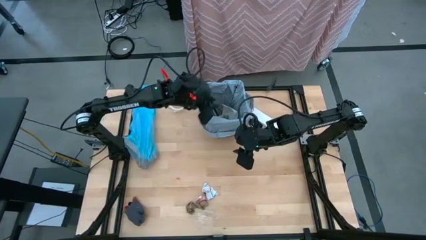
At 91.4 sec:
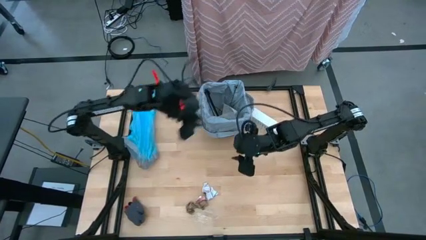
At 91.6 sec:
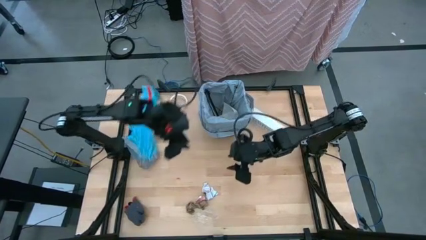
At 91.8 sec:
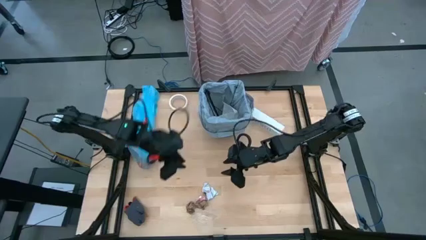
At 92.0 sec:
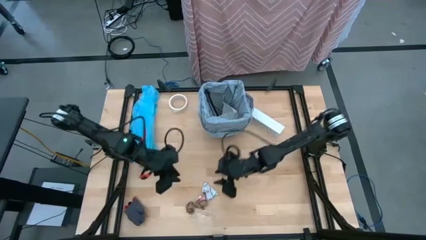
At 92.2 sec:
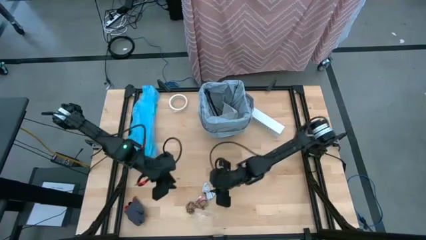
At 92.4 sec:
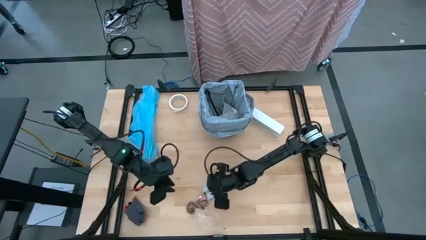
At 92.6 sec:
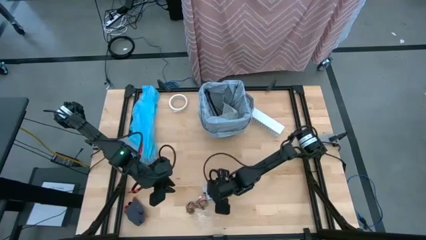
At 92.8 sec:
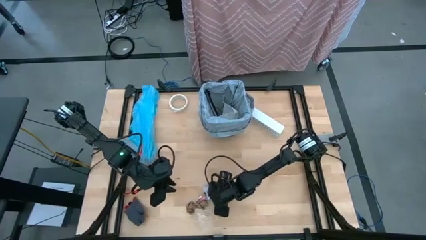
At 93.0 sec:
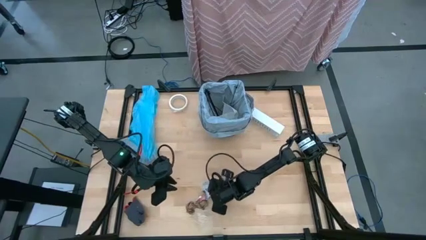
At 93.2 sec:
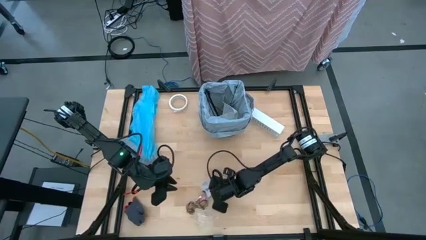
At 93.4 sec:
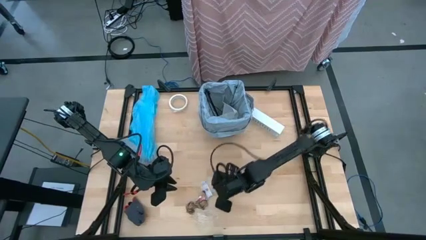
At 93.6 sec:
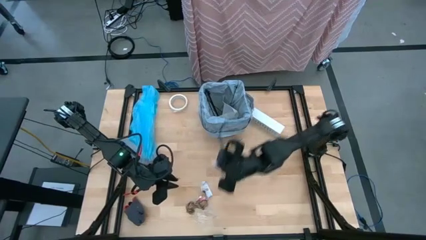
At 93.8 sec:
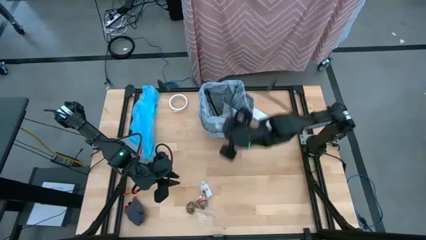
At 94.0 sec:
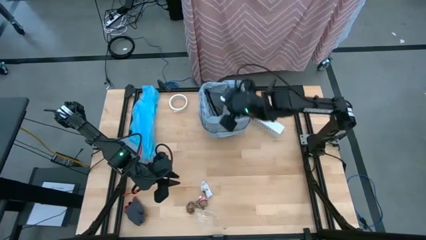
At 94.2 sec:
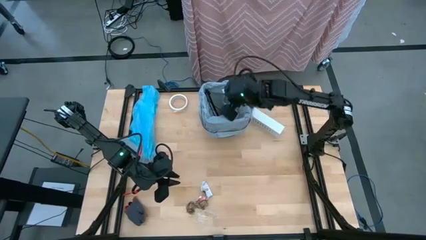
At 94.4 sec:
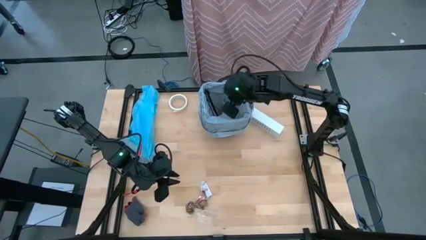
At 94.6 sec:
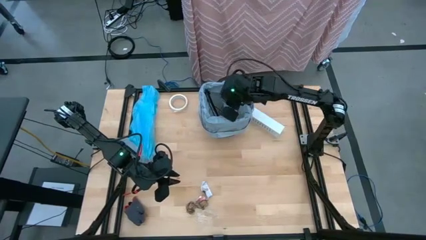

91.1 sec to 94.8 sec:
Task: place trash/remove bag and relplace
Put the white paper into the trash bin

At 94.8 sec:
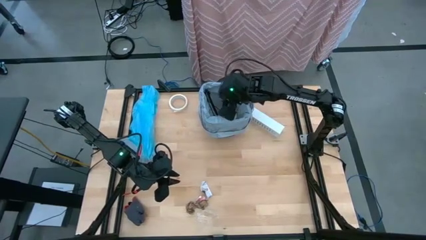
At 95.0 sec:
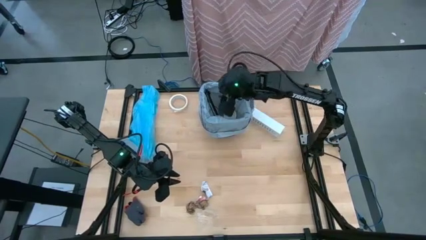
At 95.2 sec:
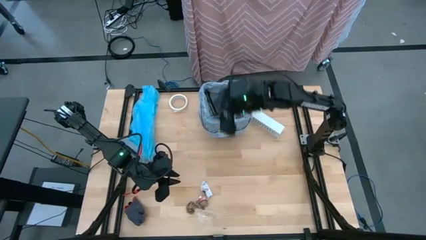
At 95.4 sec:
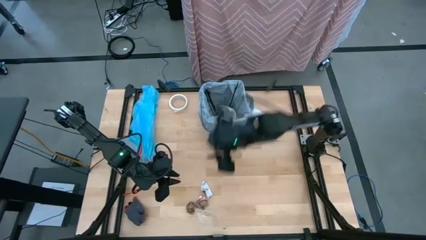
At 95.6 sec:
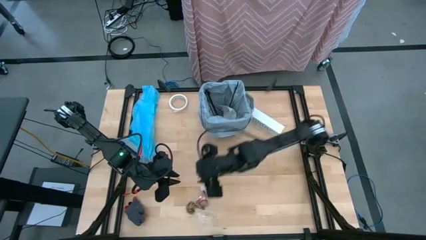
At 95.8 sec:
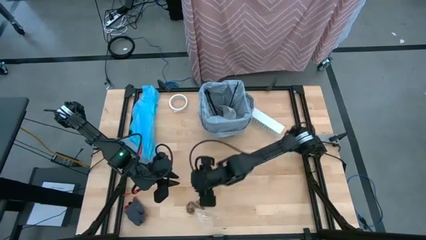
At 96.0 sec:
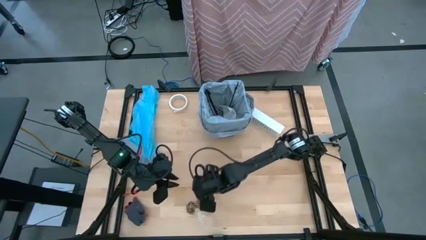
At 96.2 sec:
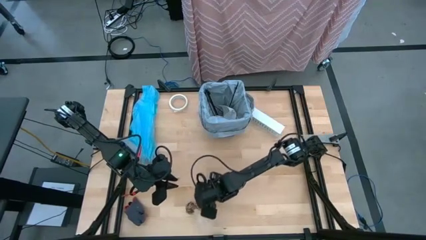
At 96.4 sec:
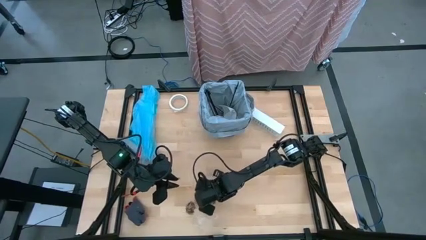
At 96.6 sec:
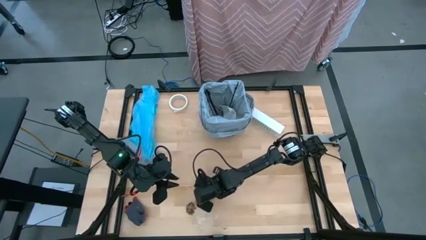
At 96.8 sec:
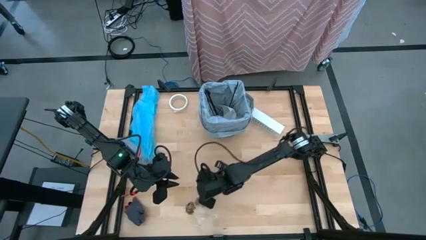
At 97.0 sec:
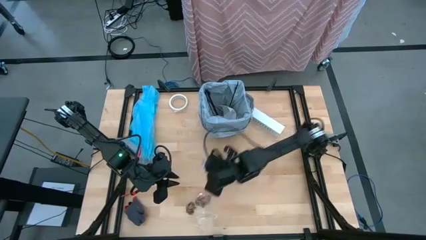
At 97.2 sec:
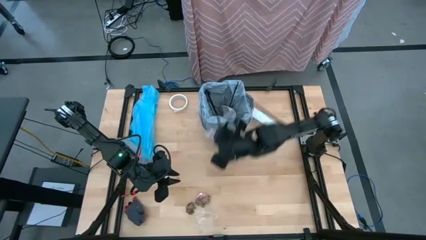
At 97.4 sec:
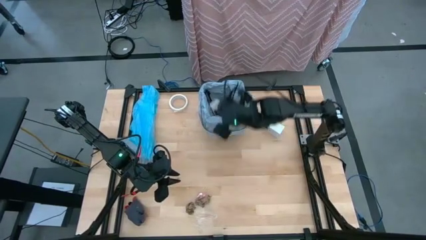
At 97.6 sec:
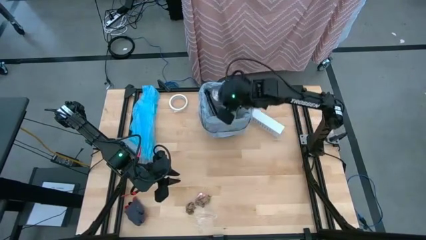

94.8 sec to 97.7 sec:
Put the sachet trash into the trash bin

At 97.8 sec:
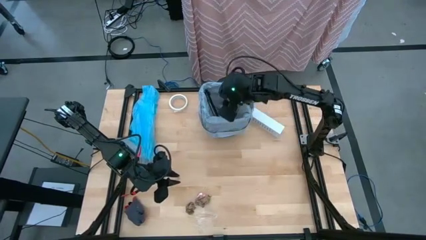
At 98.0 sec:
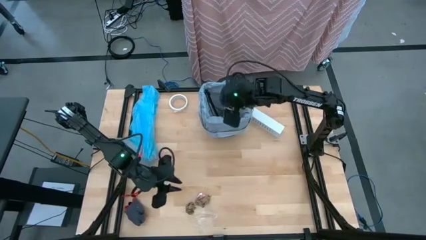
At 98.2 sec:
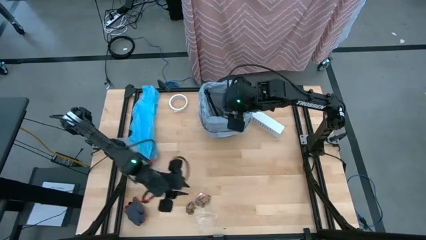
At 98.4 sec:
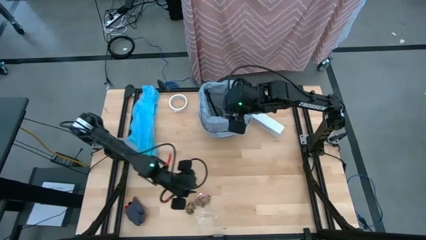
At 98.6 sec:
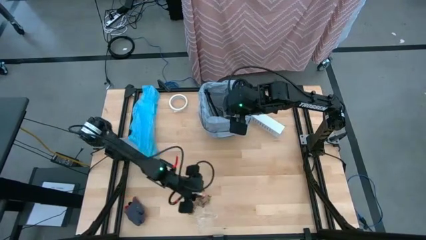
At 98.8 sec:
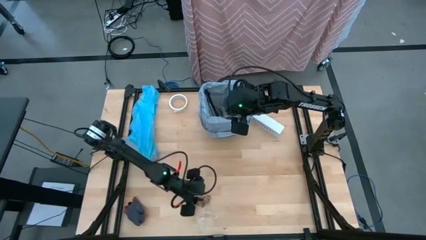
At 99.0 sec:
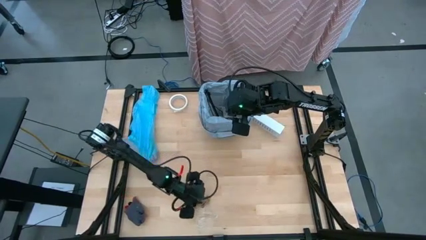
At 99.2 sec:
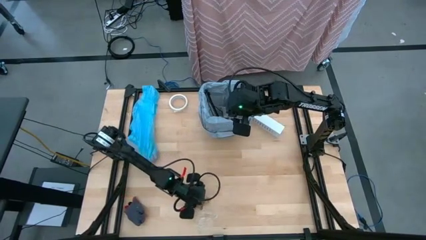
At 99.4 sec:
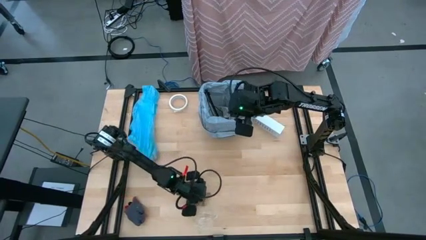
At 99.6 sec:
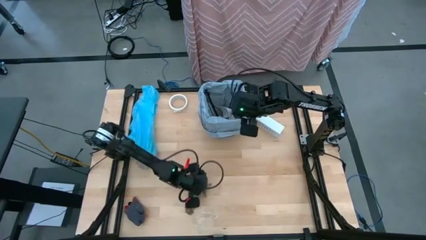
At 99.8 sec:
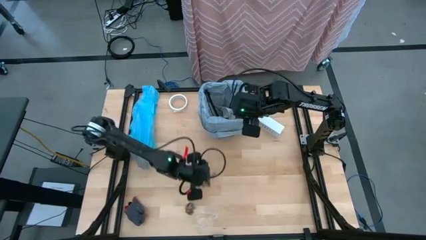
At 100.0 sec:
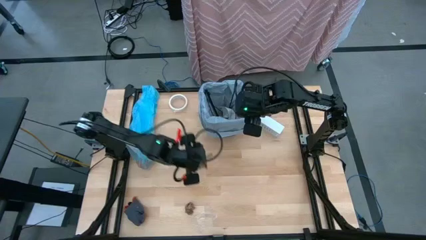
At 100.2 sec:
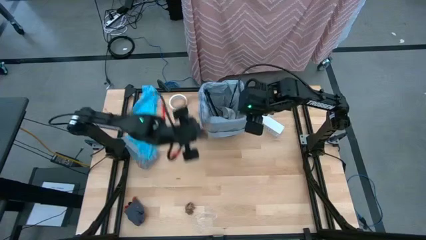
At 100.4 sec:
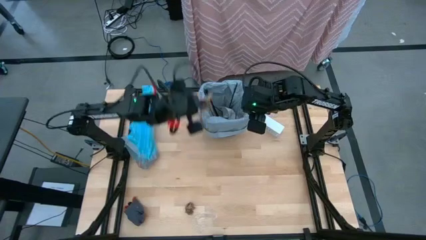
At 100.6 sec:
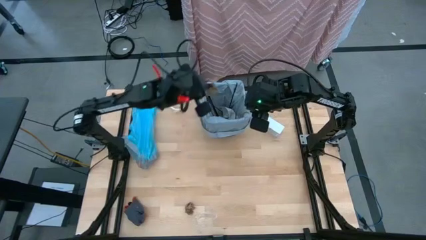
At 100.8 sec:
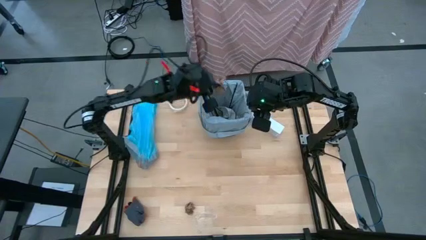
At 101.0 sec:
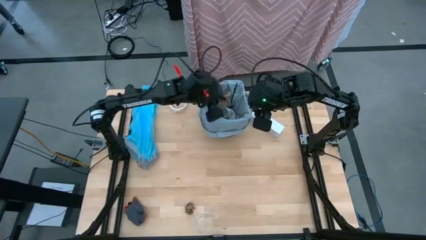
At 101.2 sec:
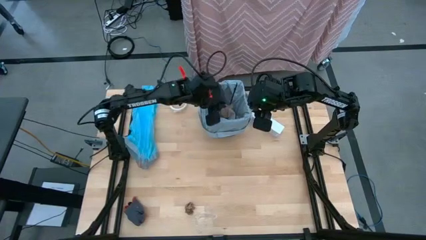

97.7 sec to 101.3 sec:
Put the brown napkin into the trash bin

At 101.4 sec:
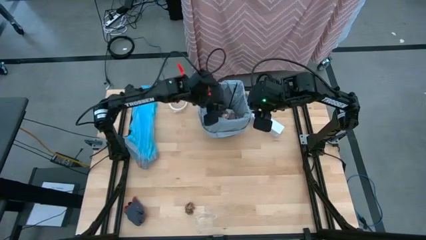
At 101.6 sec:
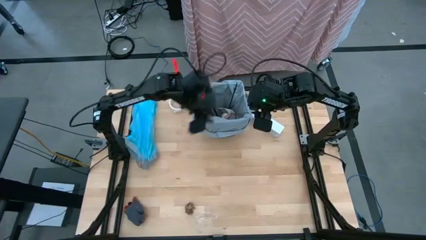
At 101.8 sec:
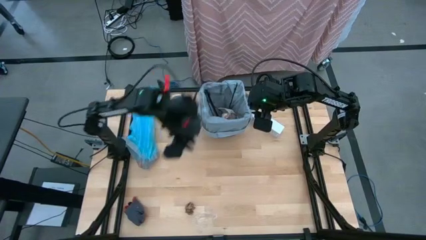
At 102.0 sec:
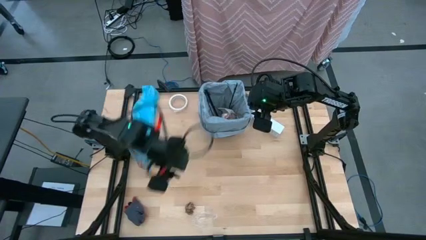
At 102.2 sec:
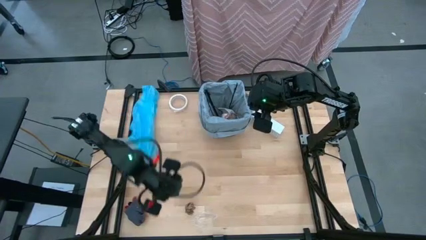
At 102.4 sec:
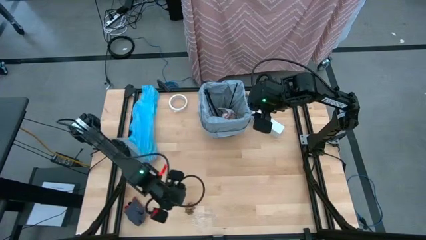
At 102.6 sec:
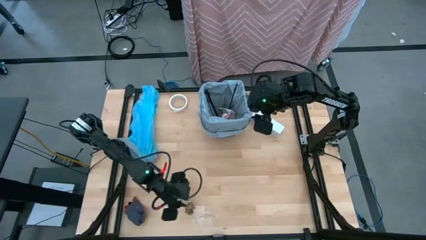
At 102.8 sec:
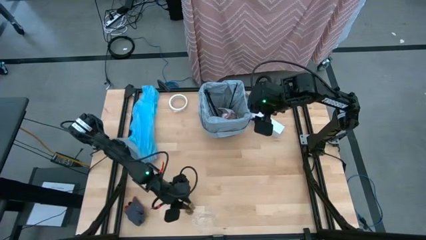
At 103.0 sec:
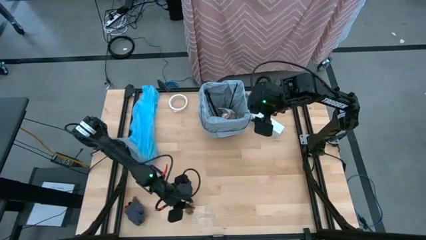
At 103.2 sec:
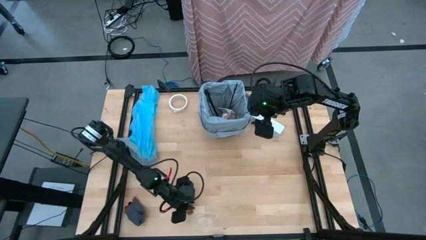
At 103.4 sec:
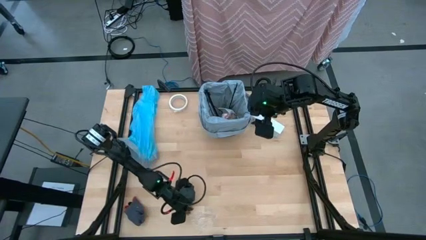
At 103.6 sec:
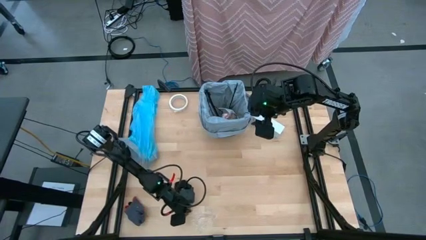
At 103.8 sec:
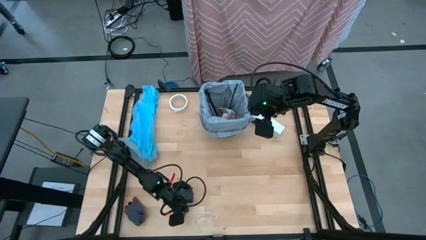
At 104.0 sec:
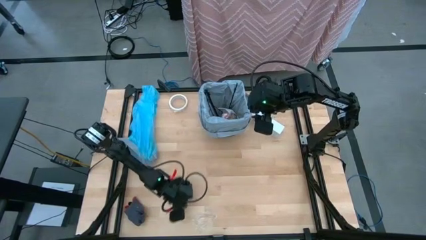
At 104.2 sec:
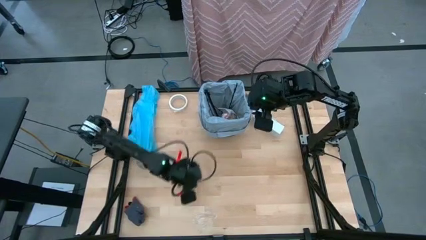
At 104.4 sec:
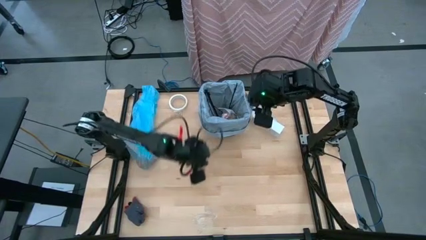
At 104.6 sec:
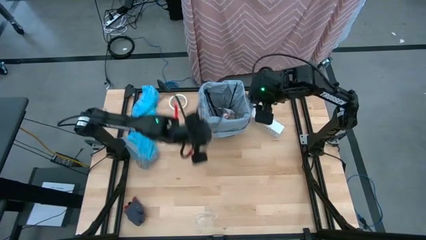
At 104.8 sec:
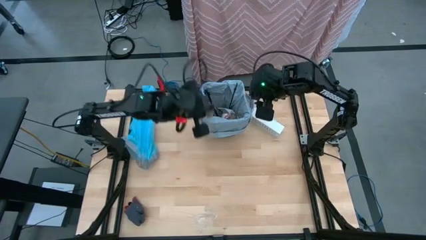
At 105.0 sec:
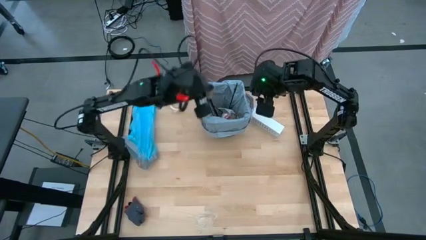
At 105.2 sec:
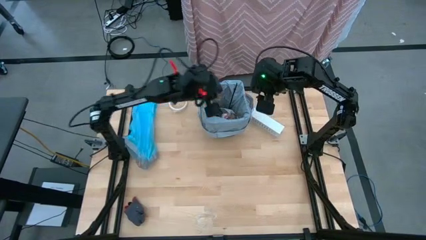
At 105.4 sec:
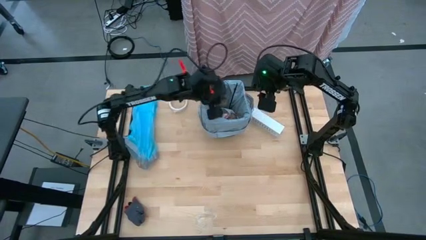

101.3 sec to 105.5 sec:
Put the brown napkin into the trash bin

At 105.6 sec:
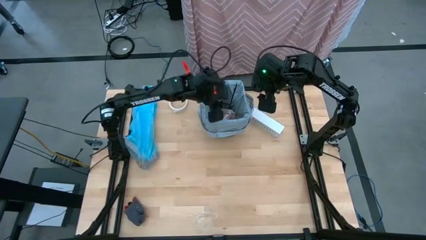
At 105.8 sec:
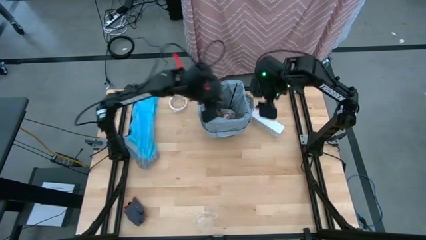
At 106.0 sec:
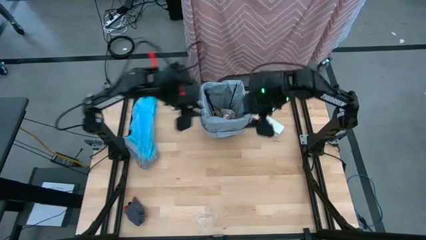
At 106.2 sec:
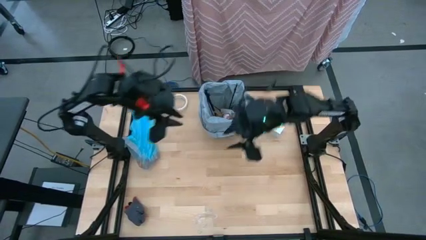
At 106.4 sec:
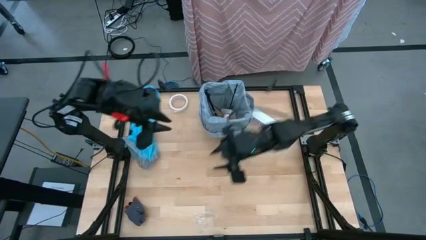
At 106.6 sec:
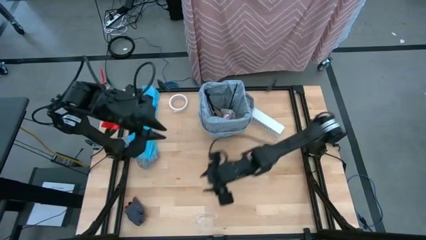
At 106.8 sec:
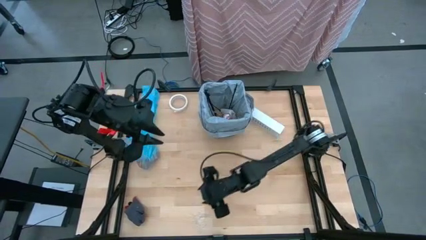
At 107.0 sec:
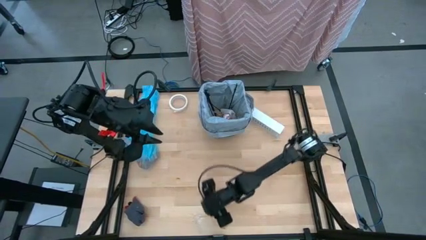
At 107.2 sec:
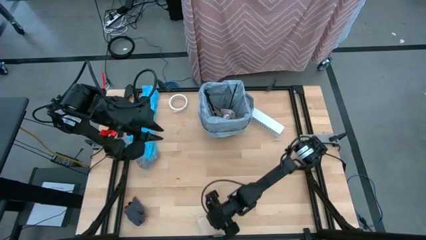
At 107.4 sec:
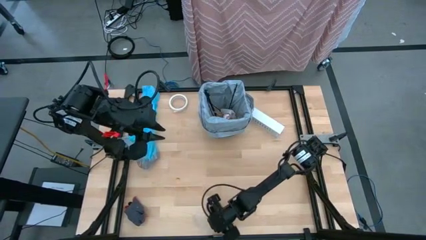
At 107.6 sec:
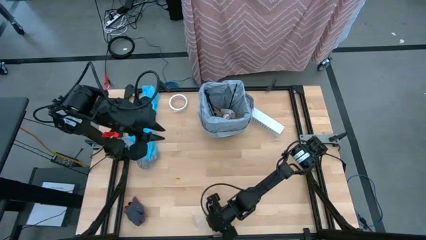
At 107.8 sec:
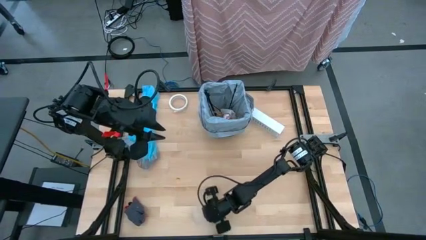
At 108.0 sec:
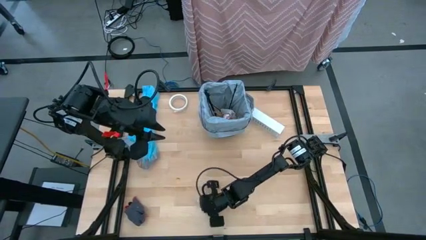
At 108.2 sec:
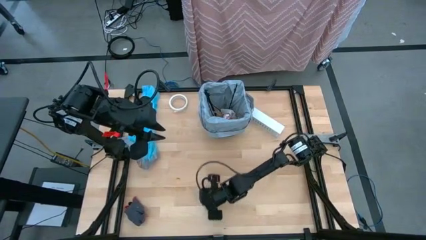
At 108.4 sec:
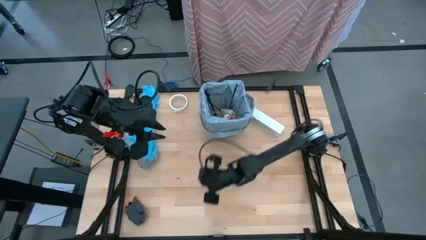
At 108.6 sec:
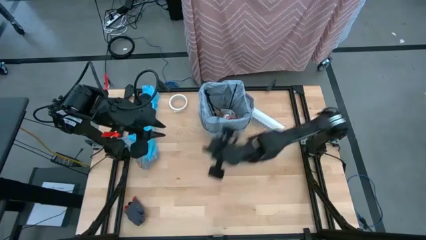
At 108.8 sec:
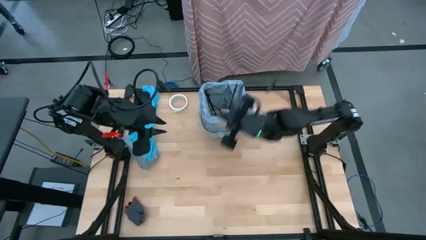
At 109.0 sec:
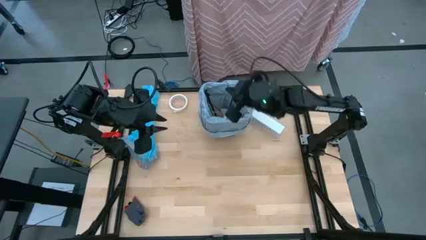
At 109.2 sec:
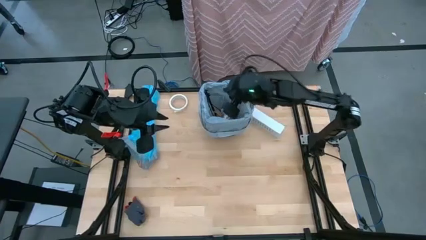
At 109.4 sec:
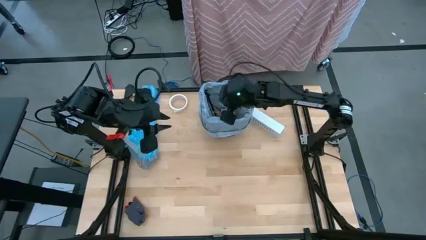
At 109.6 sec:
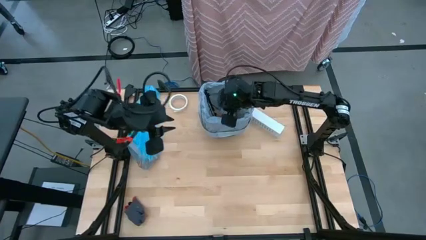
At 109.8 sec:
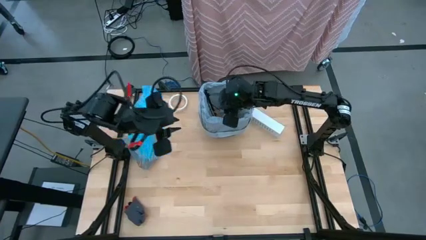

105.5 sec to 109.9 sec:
Put the transparent plastic into the trash bin
